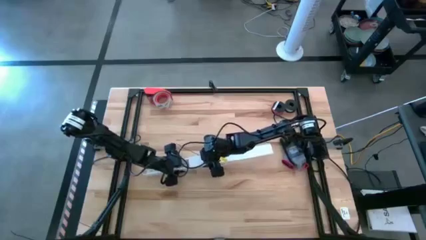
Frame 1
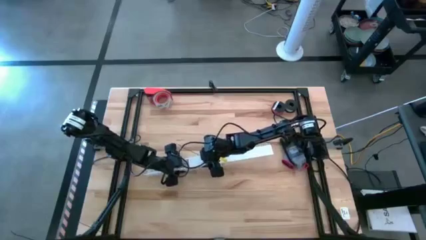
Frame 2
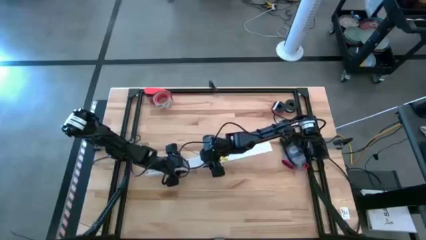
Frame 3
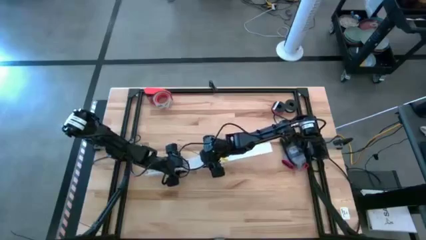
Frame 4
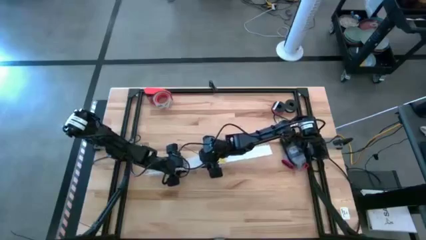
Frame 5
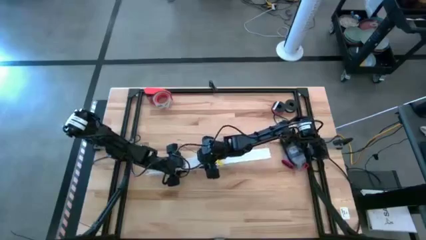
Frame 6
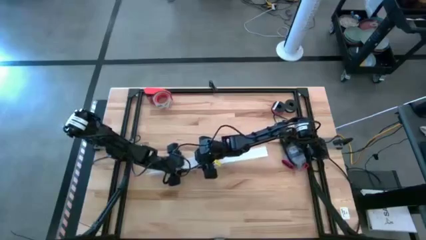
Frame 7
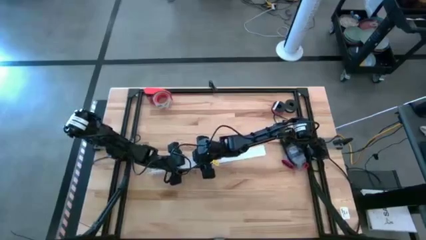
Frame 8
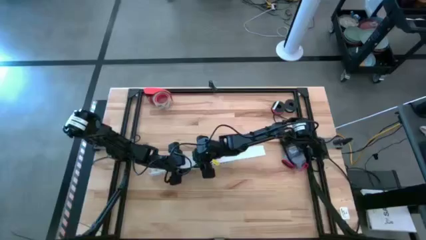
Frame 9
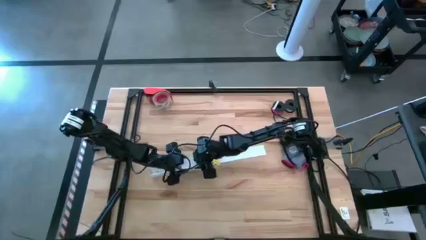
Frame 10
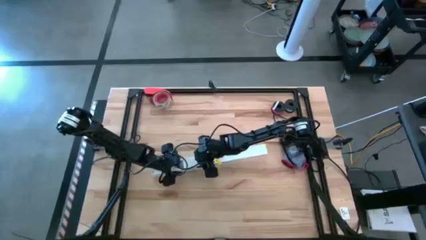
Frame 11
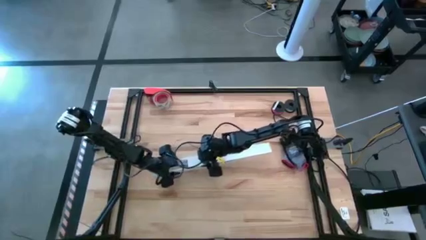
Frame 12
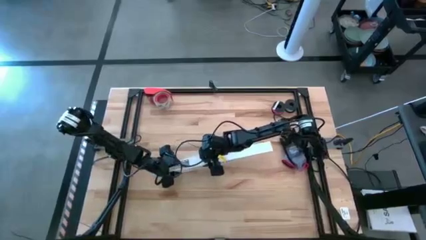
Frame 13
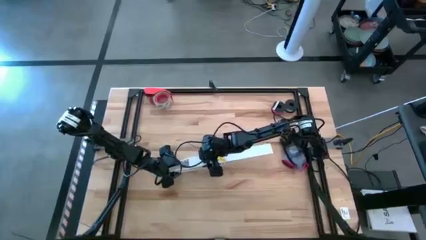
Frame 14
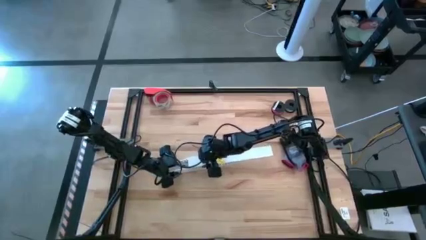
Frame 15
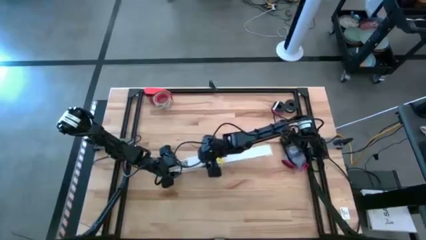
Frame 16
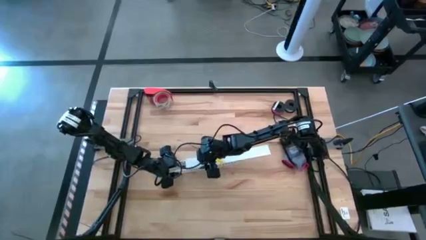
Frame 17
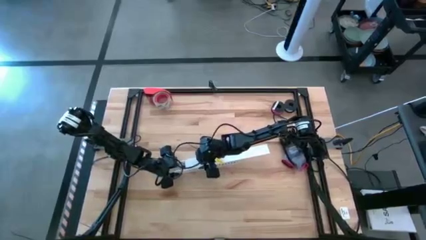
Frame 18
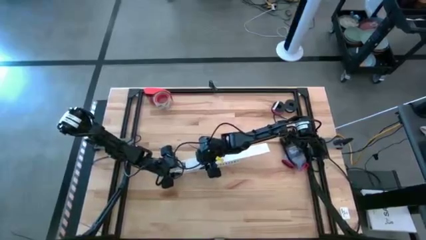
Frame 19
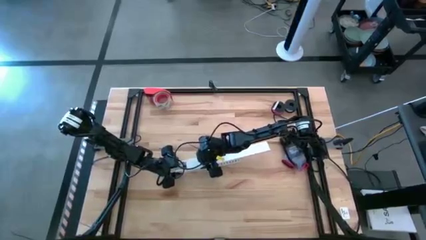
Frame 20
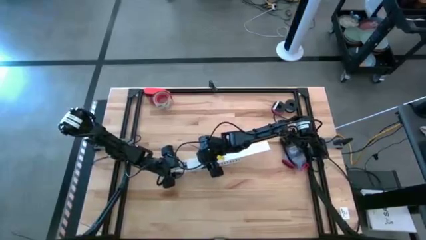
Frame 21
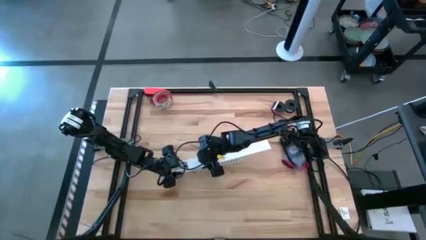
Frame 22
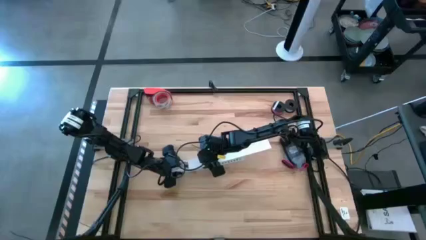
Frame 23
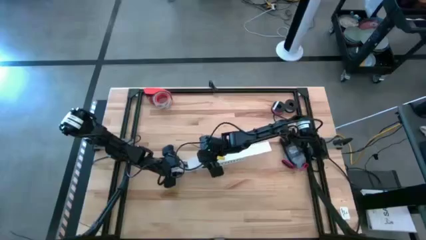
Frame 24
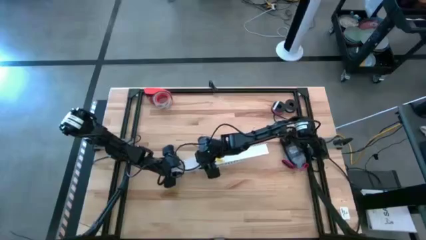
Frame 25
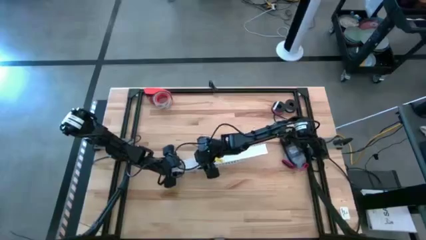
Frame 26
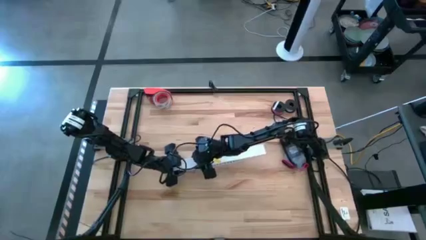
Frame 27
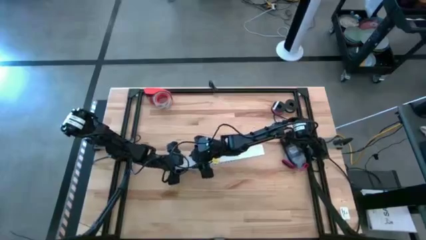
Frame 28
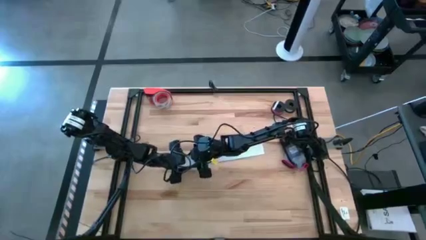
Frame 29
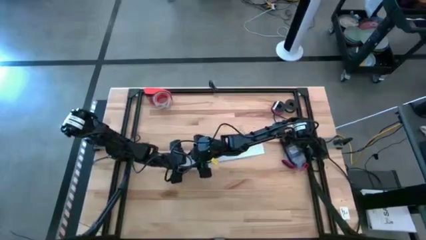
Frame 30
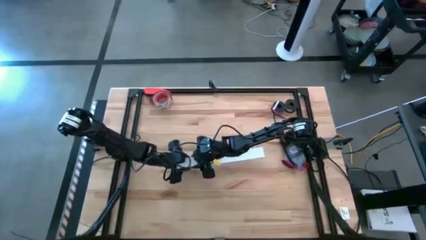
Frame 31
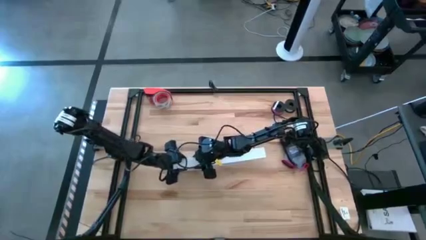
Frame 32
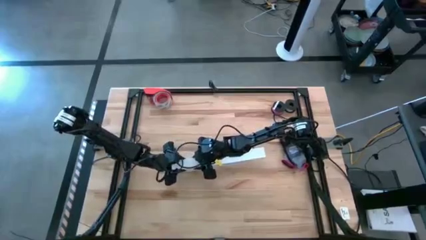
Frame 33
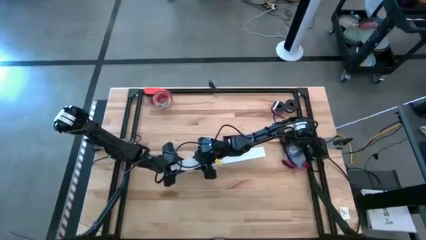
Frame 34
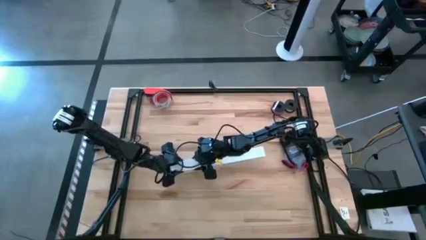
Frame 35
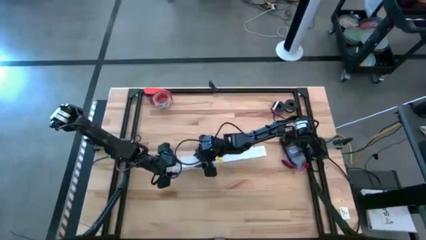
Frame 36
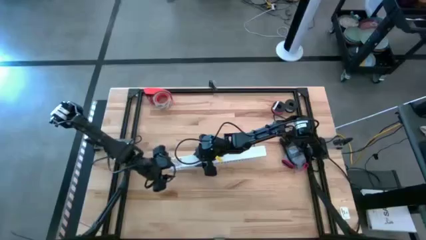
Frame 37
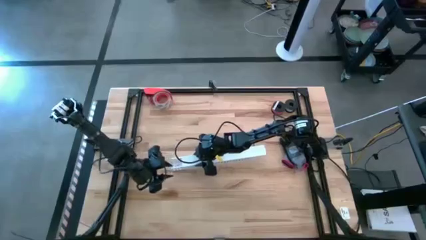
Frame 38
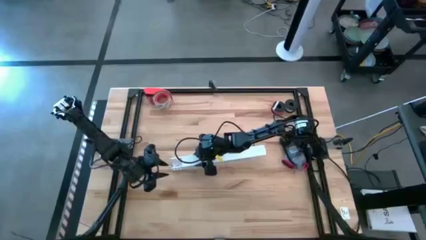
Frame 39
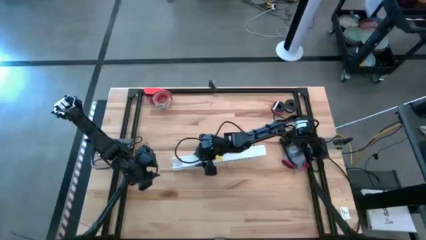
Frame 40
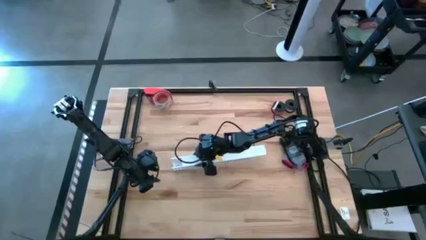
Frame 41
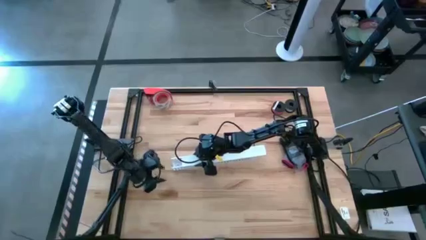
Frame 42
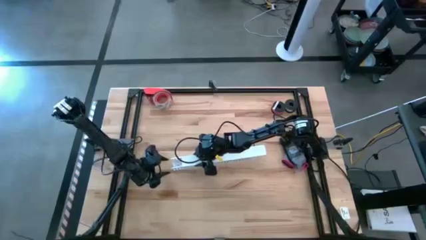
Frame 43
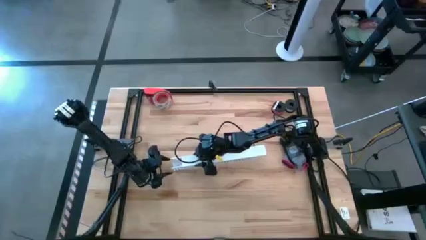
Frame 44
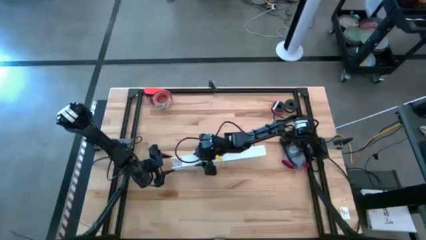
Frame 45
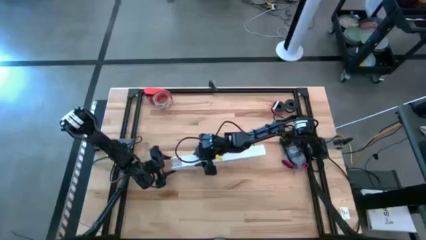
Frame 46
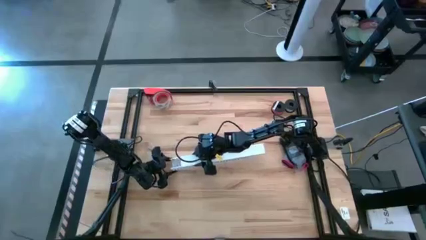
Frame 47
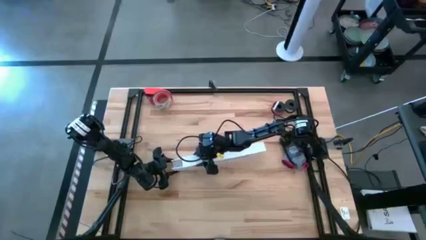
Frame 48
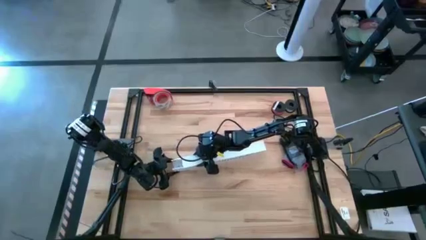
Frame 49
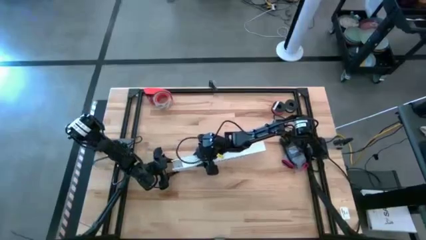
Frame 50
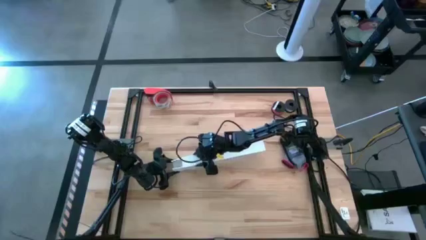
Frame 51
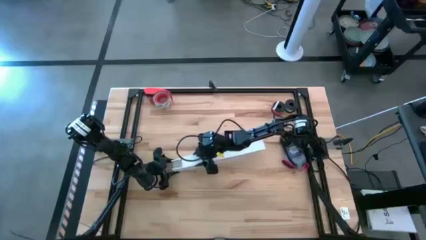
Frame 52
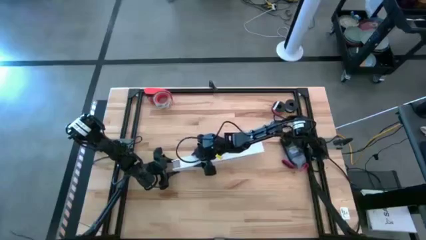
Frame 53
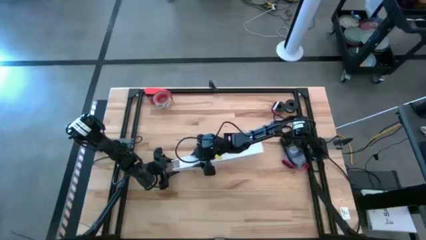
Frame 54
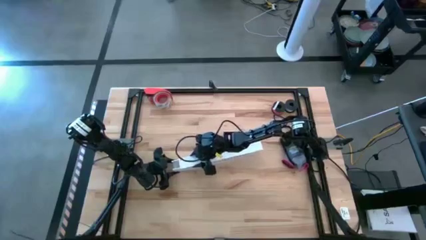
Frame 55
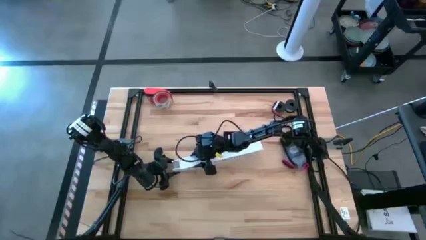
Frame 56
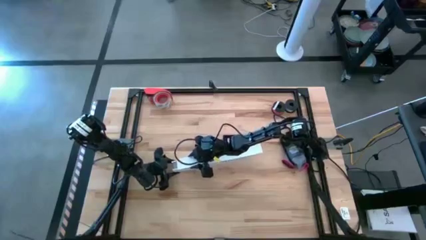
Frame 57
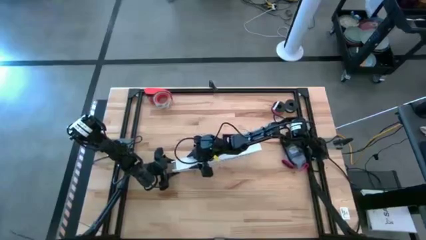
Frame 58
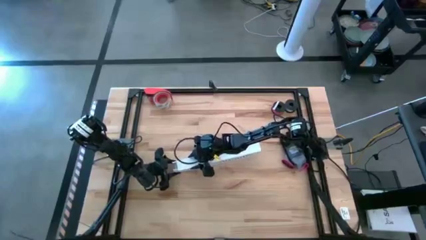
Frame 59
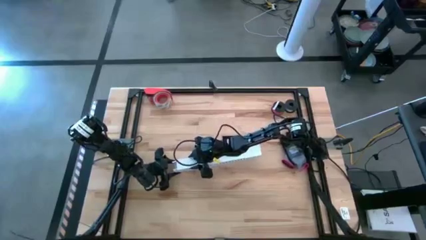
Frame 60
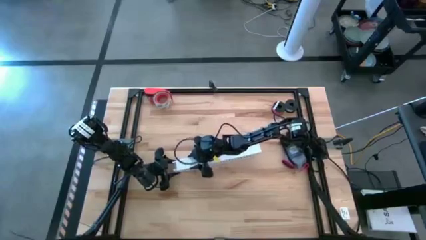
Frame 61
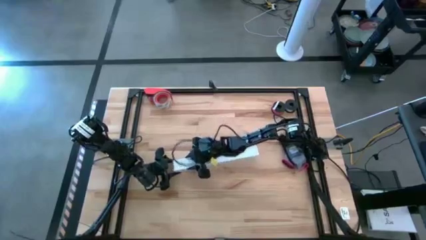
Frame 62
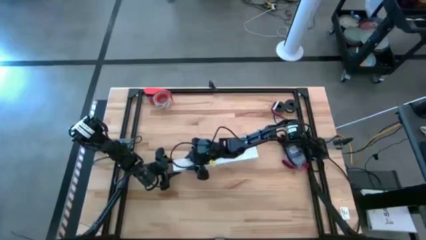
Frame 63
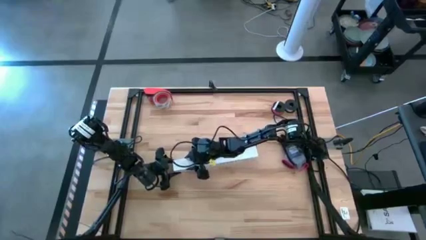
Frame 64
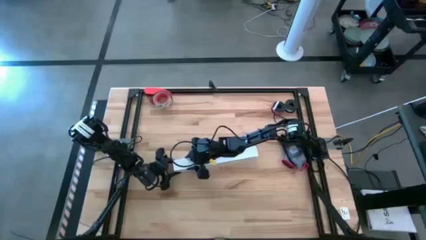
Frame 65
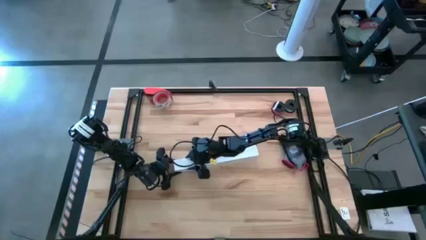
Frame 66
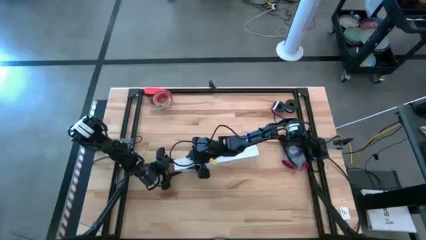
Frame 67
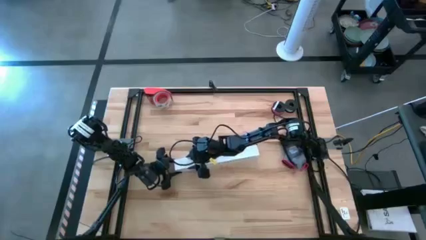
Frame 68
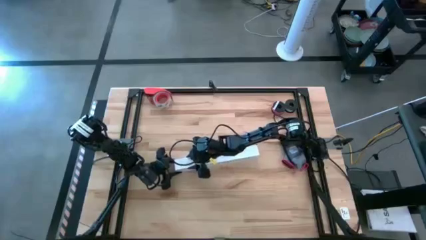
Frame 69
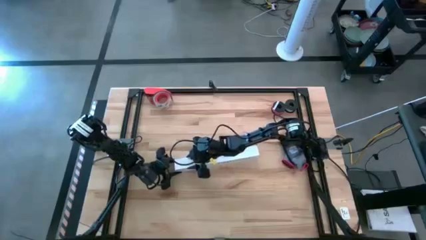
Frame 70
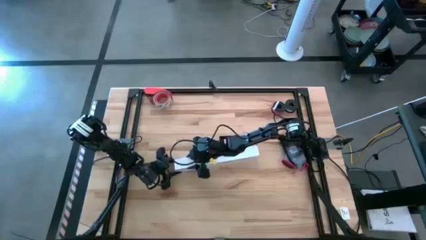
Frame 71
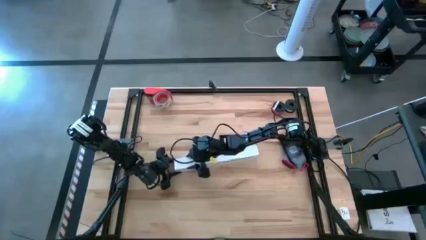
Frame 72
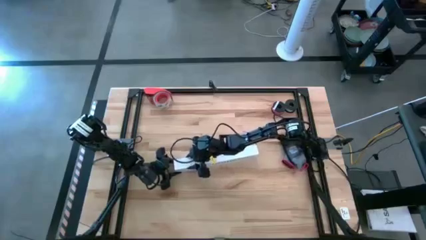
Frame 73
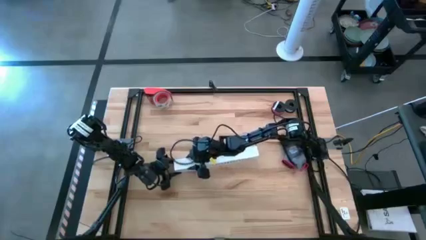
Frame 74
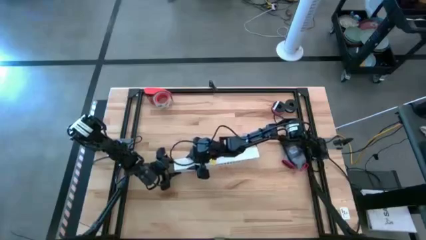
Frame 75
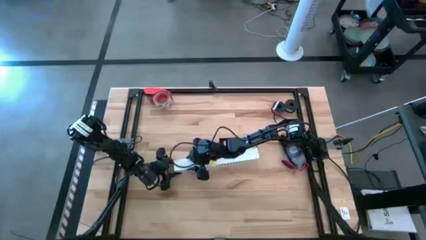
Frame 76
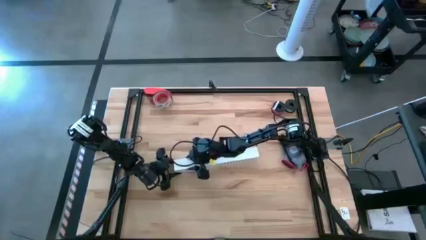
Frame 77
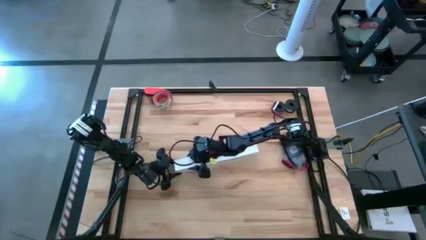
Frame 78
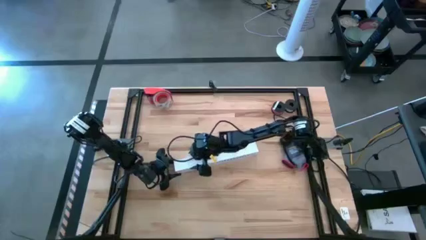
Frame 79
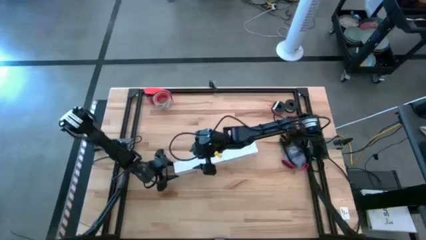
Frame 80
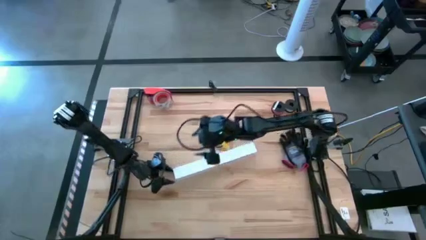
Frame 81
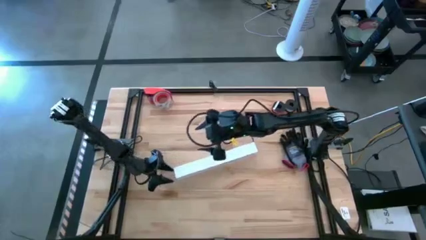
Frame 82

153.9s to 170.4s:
Task: Ziptie cables
Close the white cable duct
